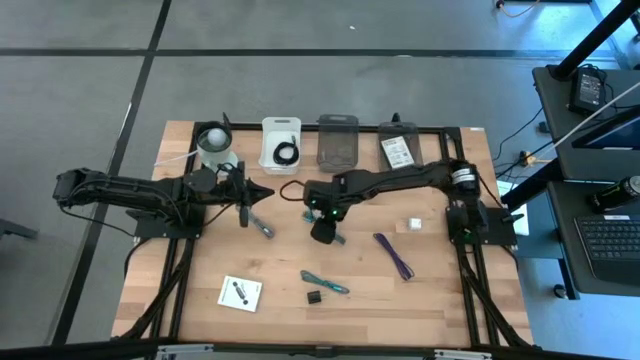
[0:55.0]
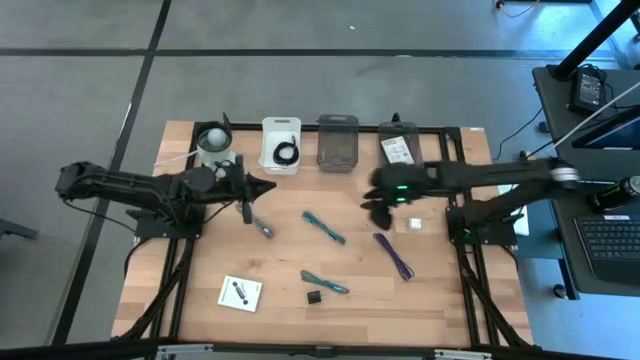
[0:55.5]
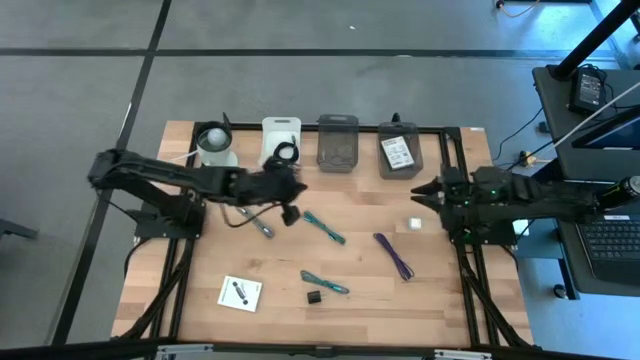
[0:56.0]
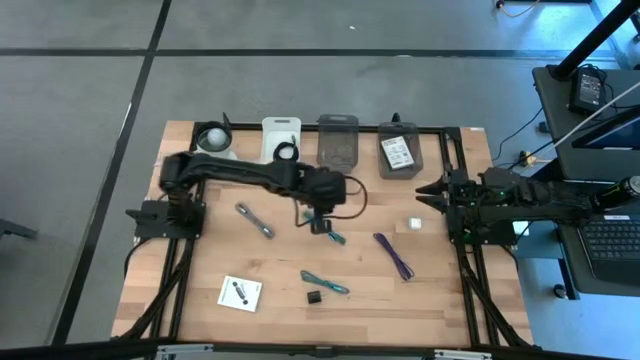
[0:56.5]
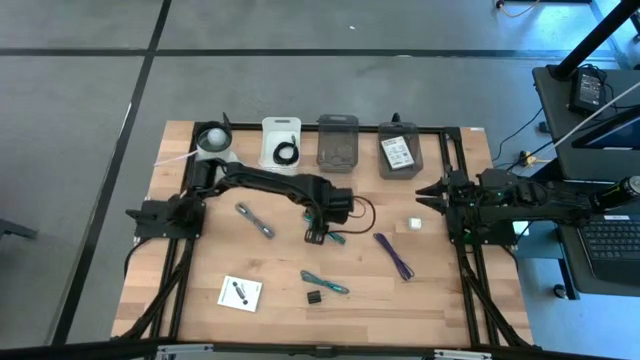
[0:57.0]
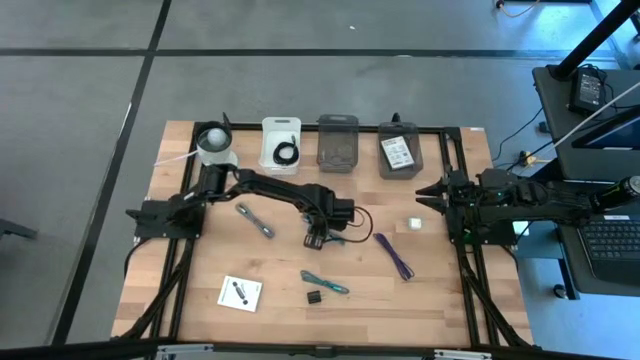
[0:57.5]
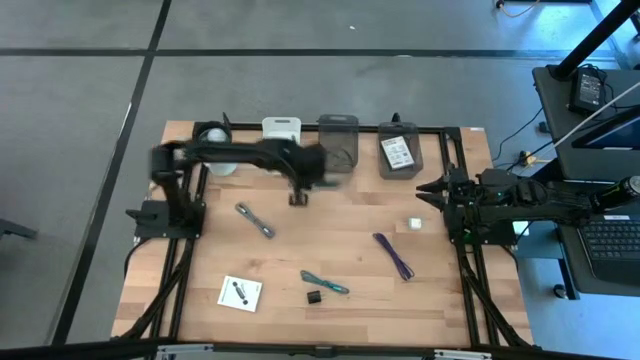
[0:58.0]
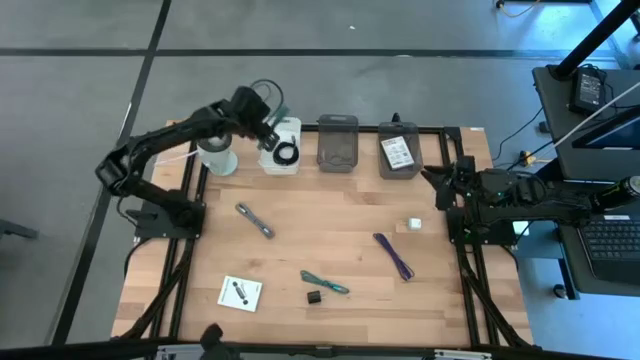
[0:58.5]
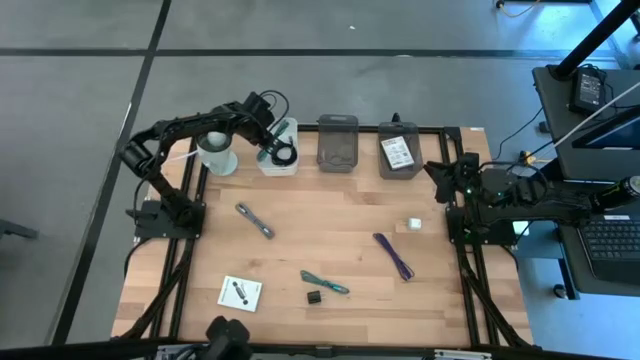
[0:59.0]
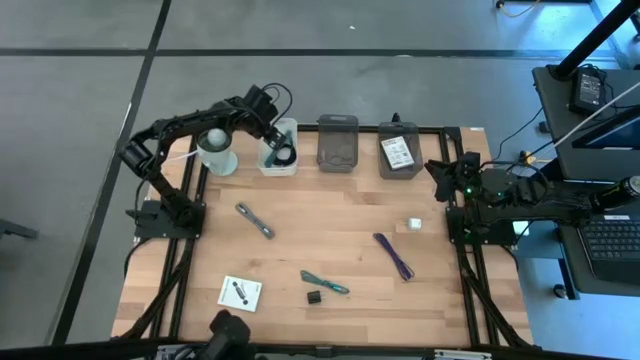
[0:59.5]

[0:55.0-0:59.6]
Task: Pick and place items into bin
Put the blue patterned charger cable into the white bin

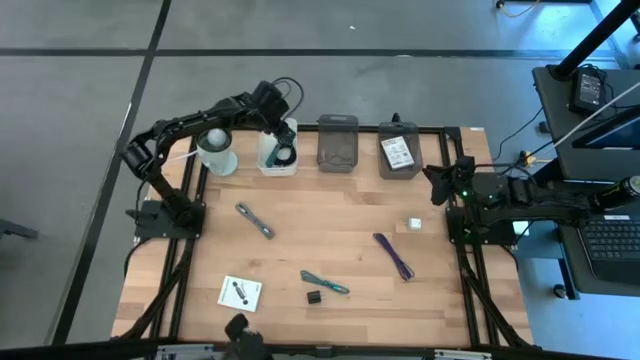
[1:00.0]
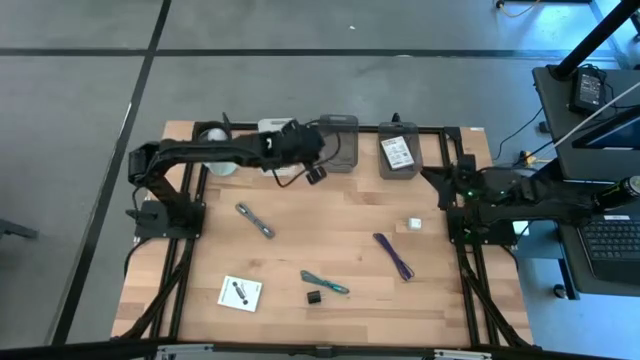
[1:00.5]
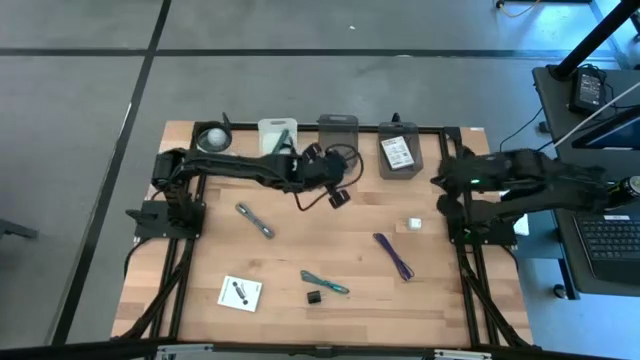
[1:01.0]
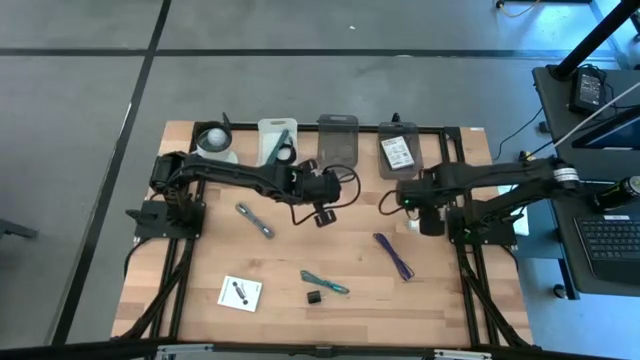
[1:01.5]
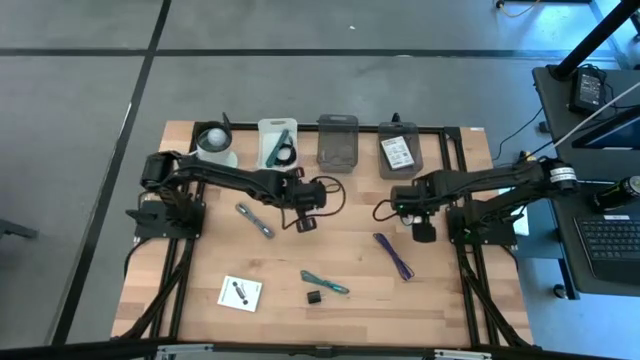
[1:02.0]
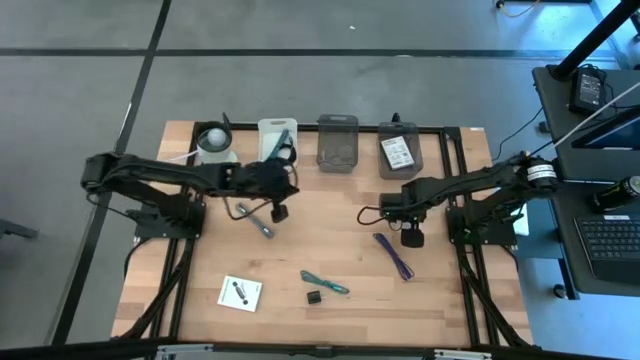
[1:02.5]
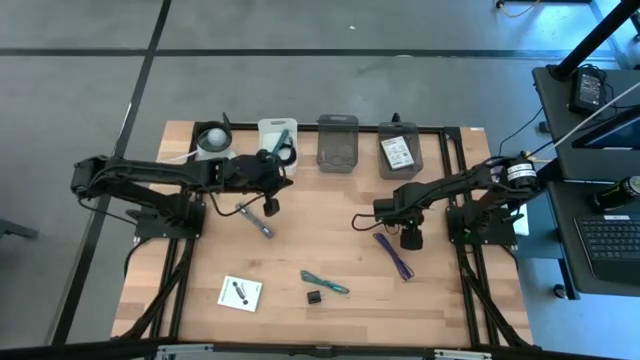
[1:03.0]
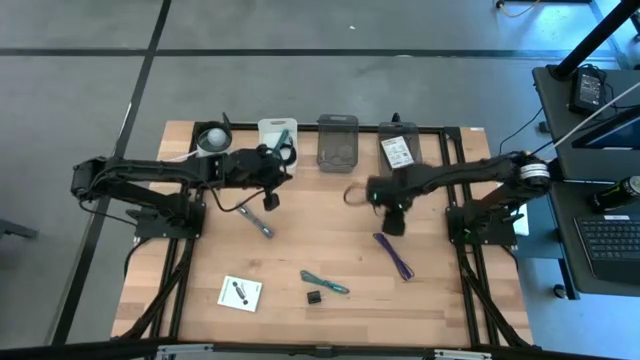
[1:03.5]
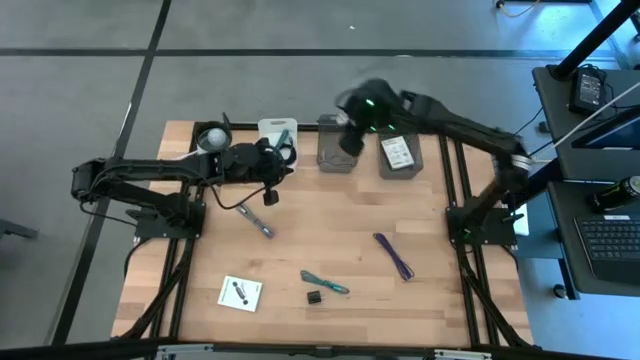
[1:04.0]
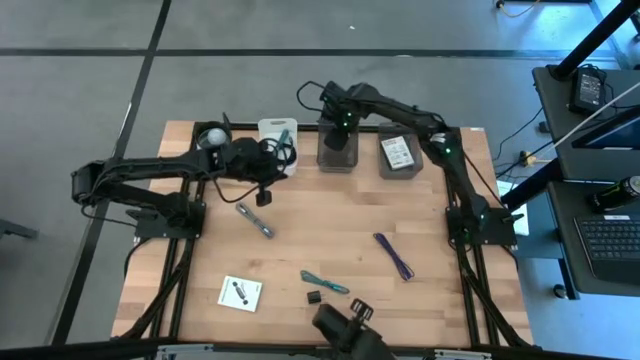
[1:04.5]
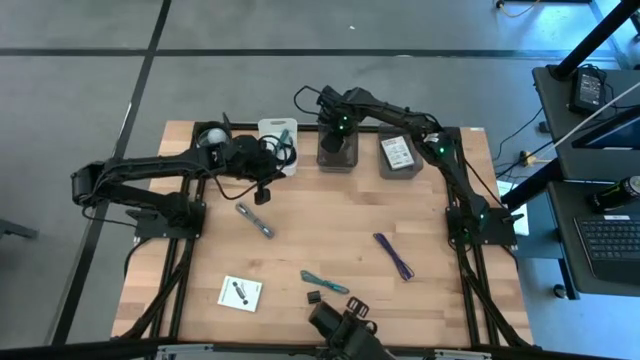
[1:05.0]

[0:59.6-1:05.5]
Put the white charger adapter into the left black bin

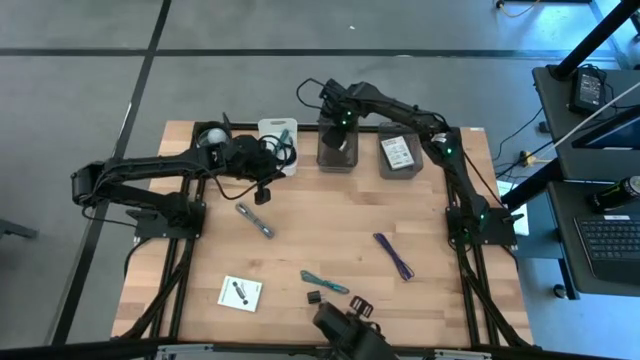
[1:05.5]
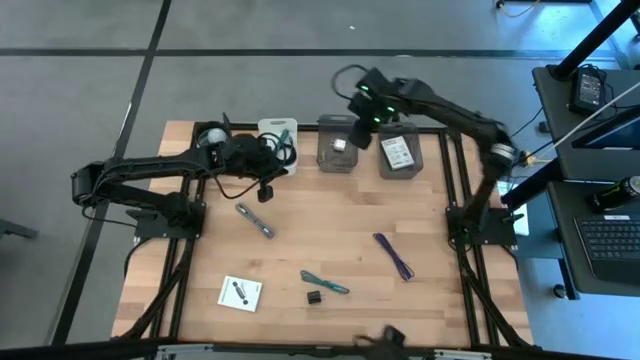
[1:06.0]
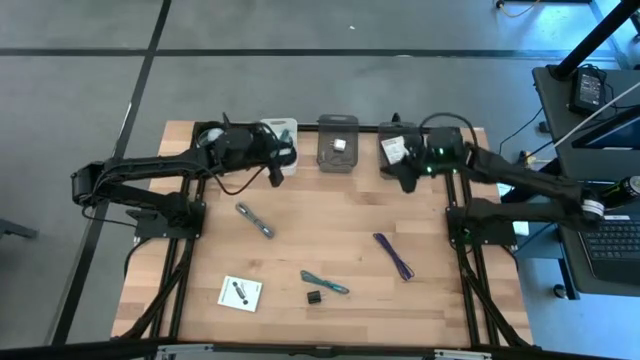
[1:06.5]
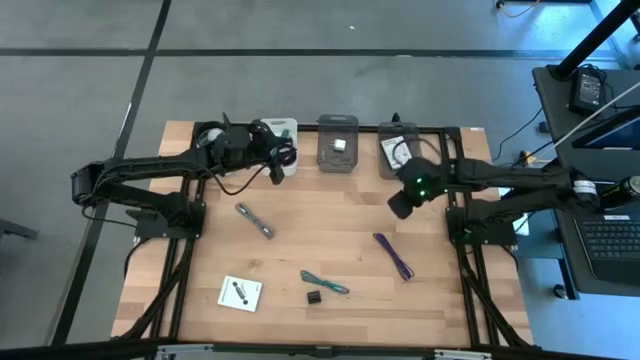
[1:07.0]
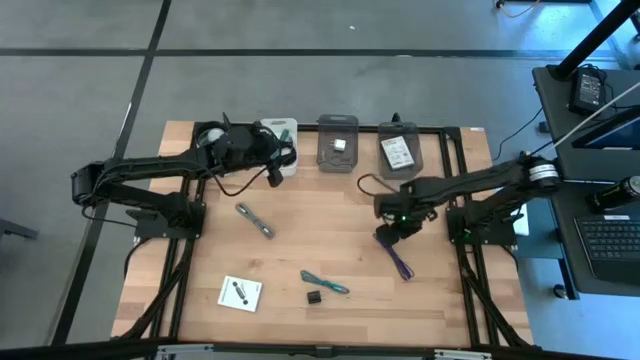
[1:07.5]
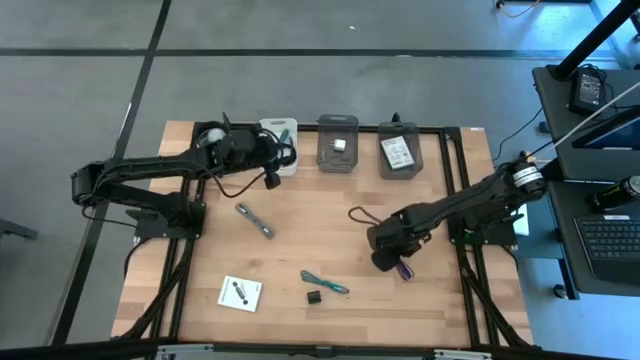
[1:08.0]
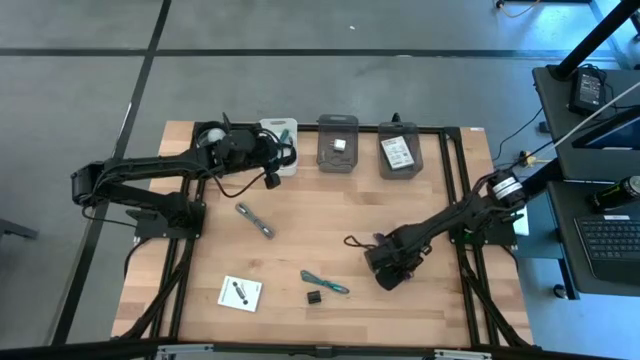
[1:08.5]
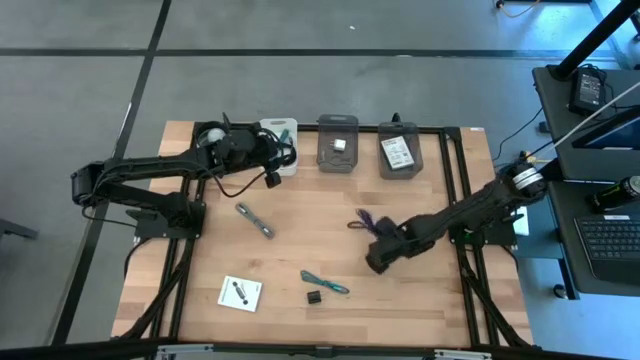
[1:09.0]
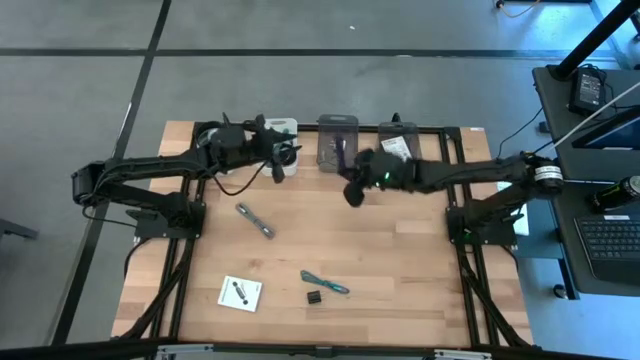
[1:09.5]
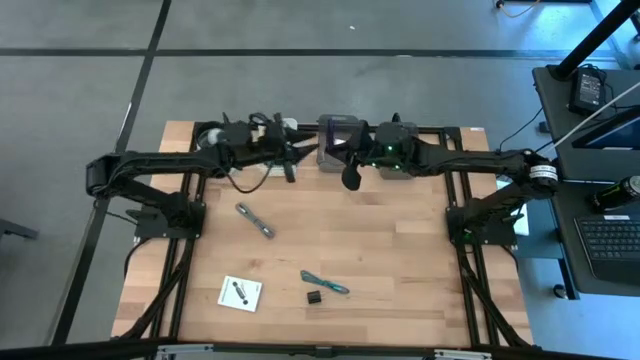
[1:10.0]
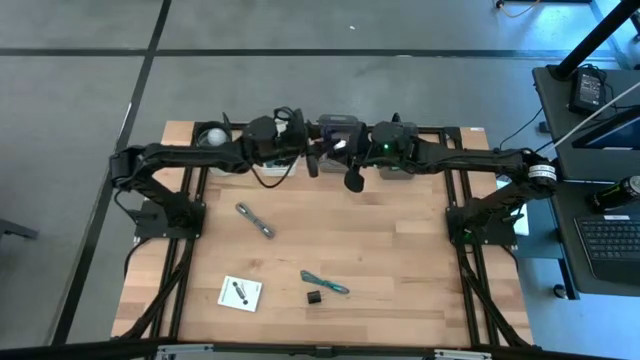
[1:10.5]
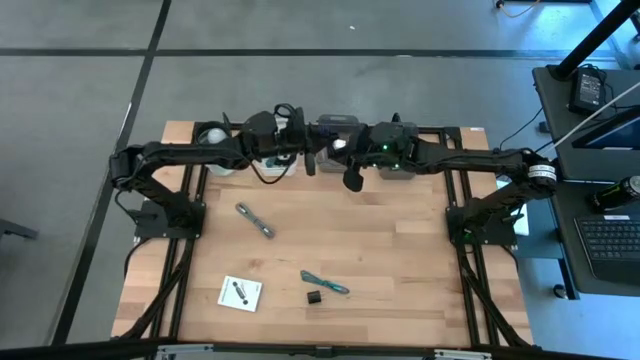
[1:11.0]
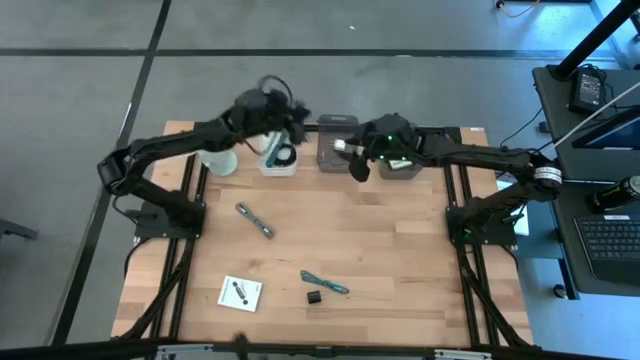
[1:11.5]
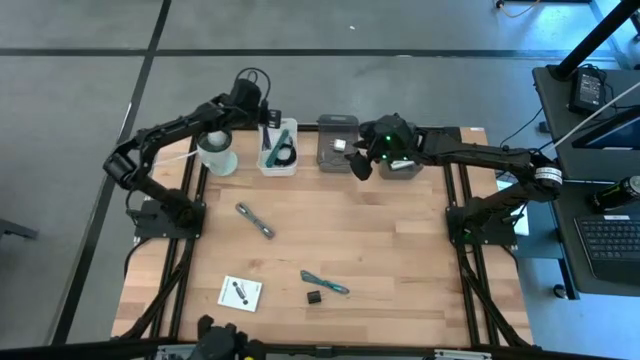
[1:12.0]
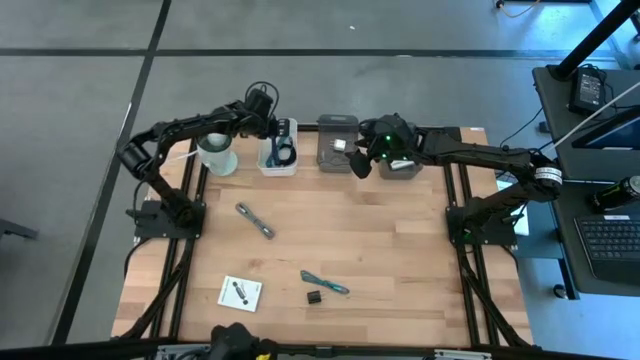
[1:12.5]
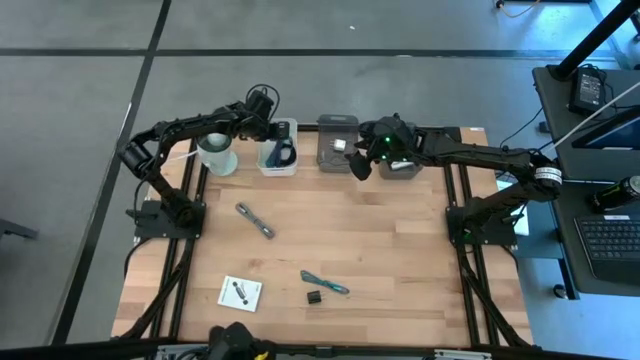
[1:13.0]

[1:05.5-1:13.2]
Put the violet patterned charger cable into the white bin

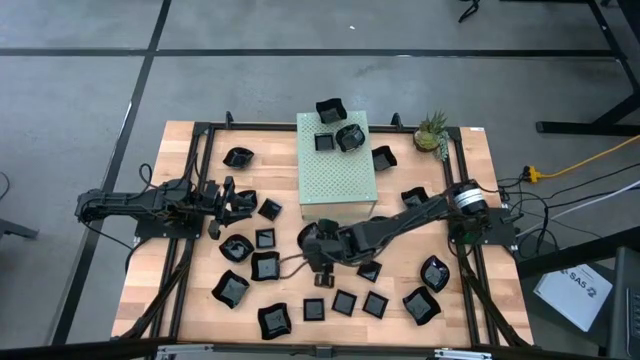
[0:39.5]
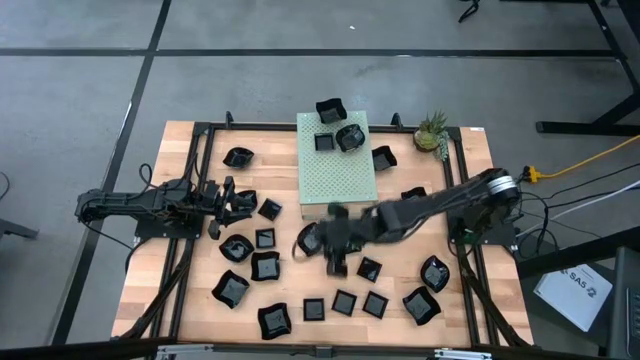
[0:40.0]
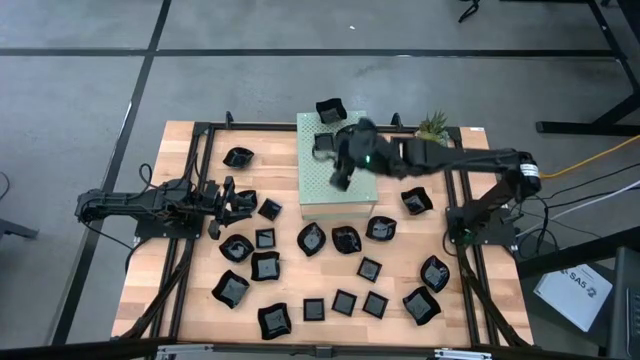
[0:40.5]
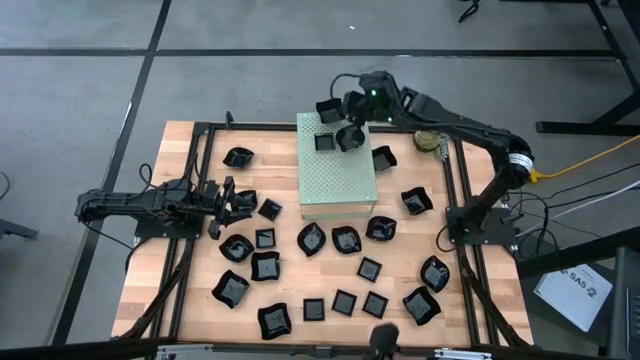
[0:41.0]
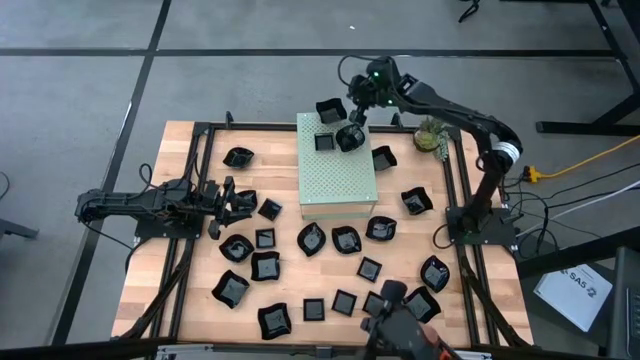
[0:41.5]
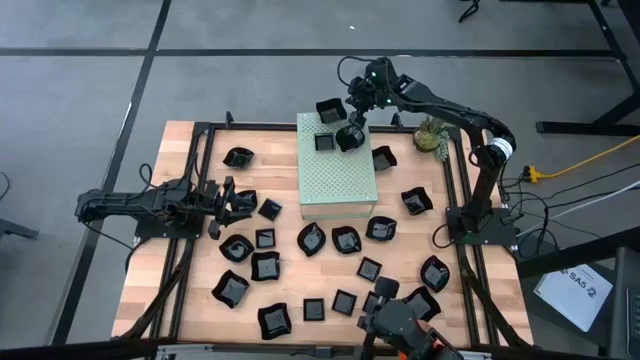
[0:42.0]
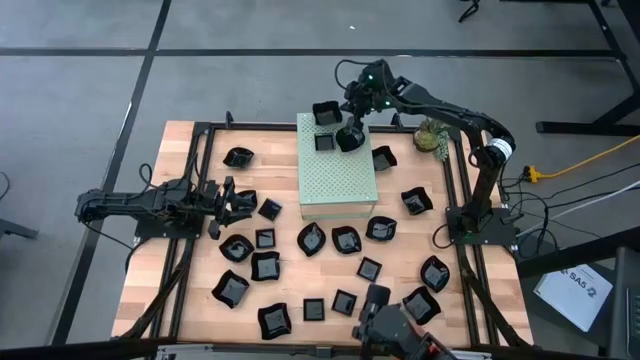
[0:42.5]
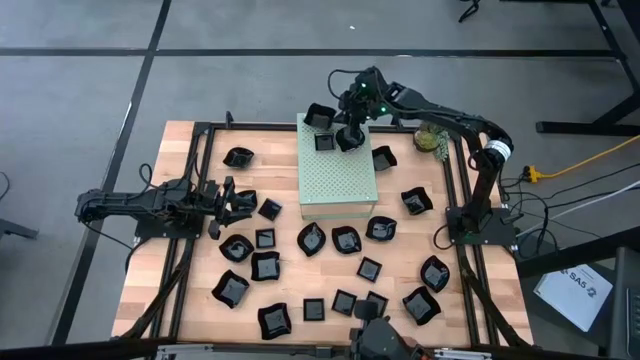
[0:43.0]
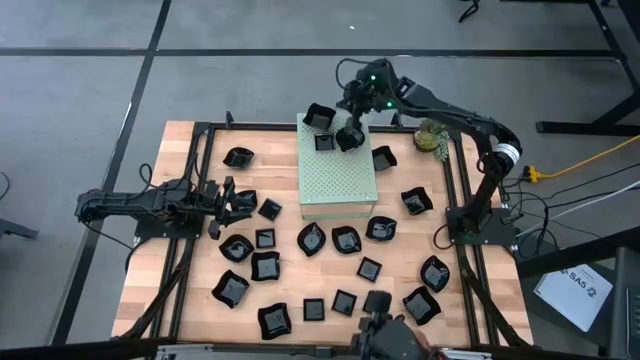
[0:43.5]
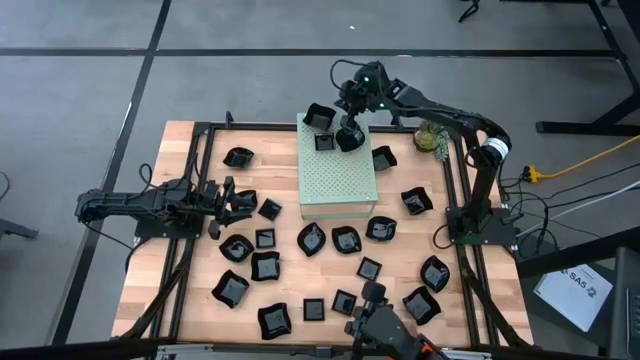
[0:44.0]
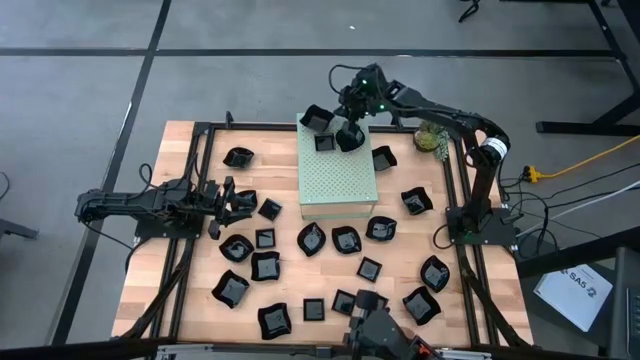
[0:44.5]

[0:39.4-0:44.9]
Task: Pick & Place Mini shaped plates
Adjust the black distorted square plate on the shelf
